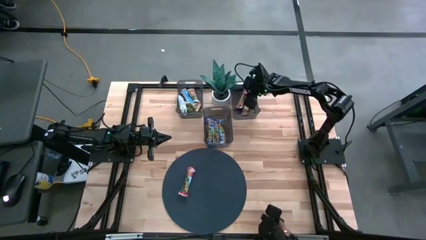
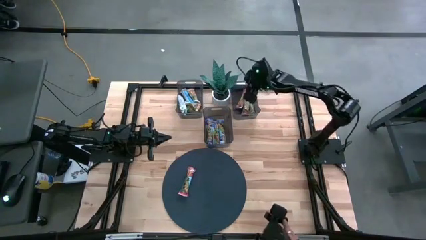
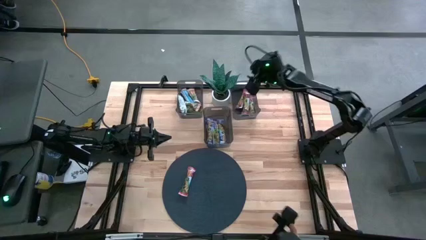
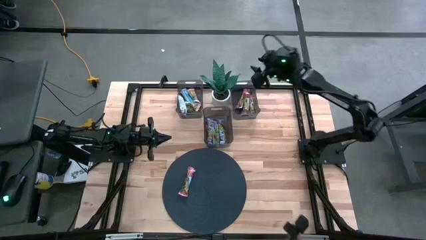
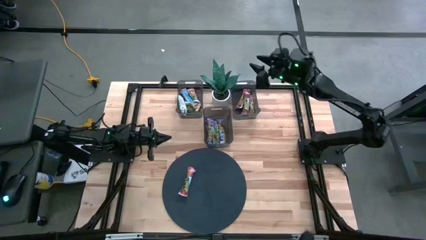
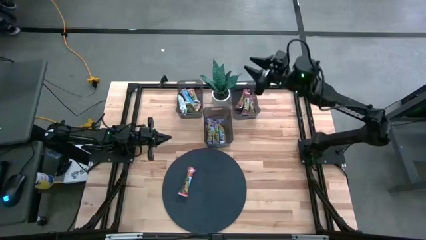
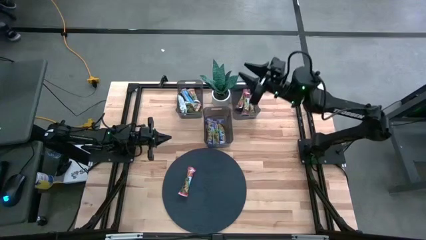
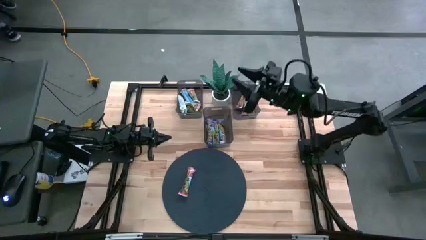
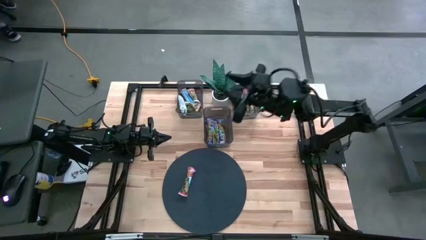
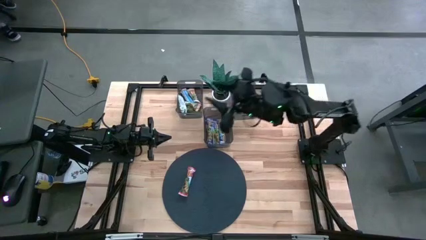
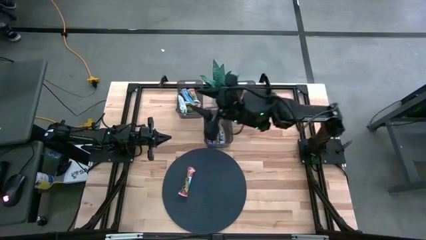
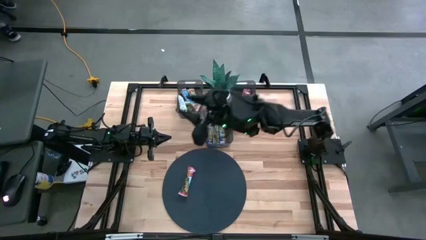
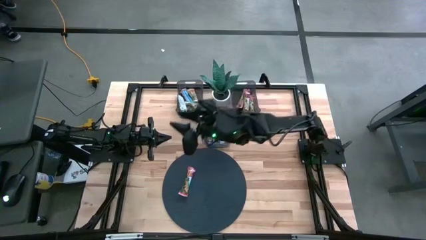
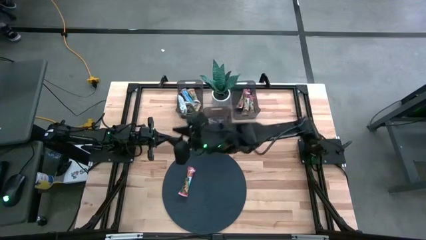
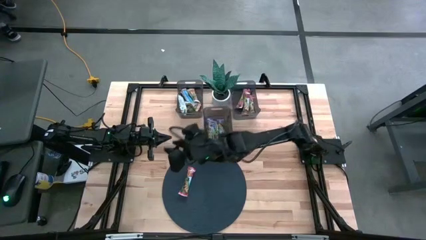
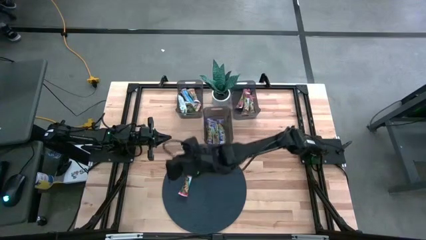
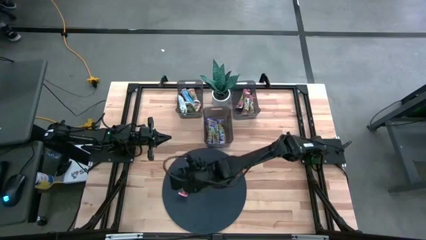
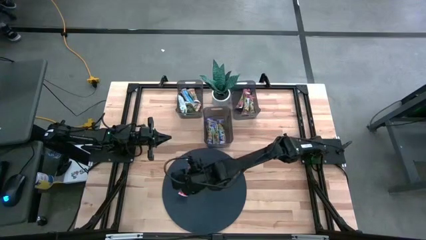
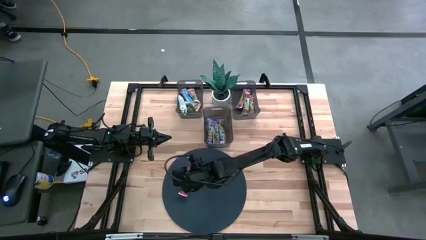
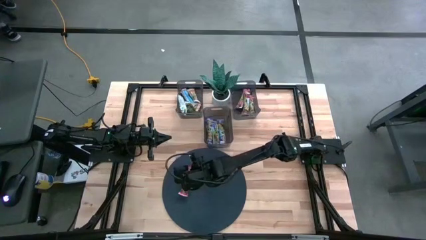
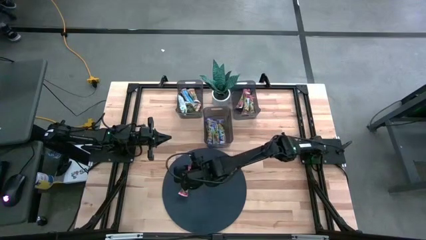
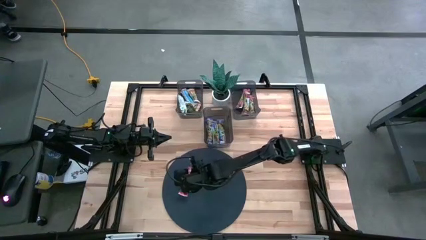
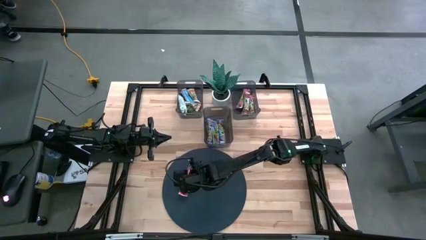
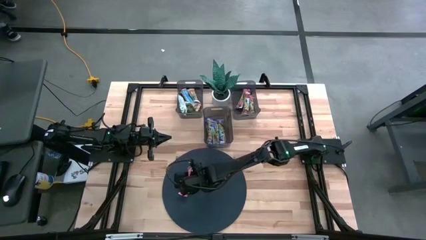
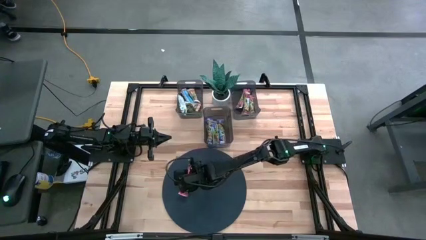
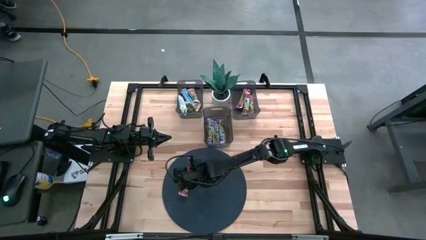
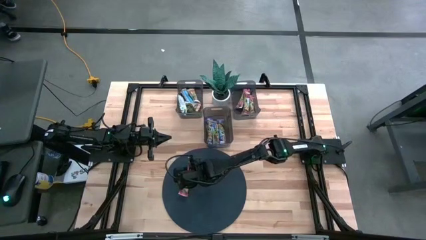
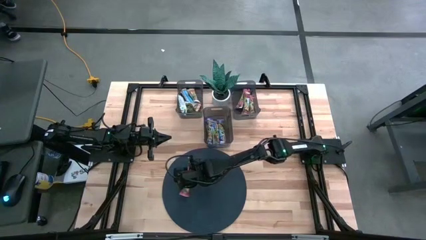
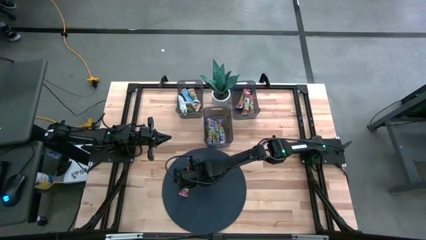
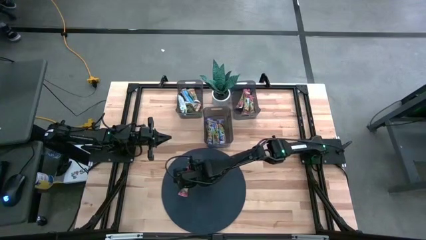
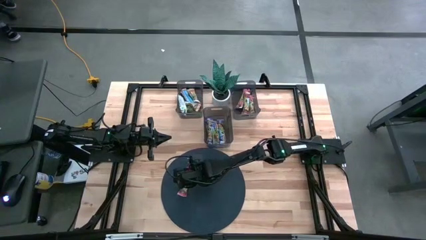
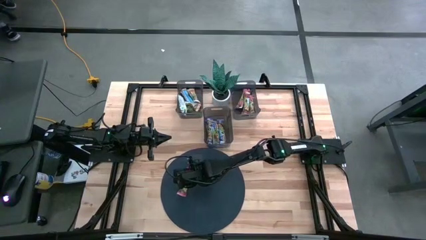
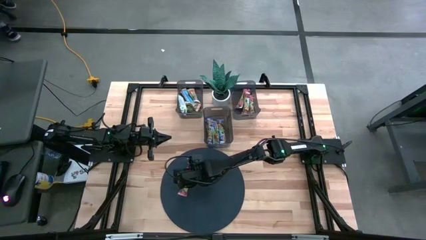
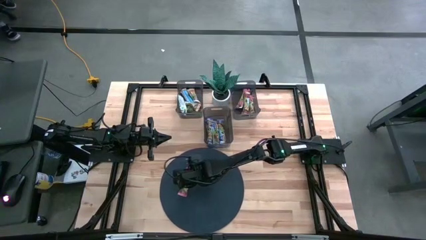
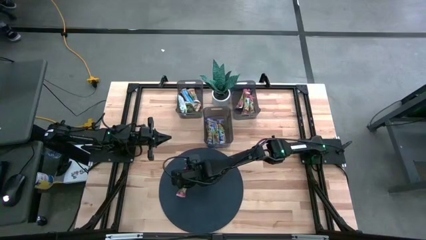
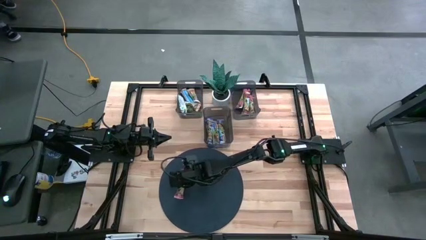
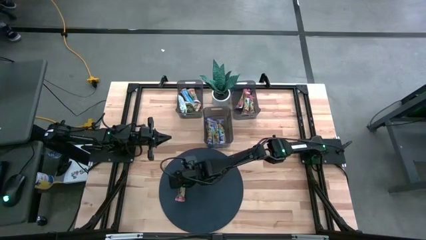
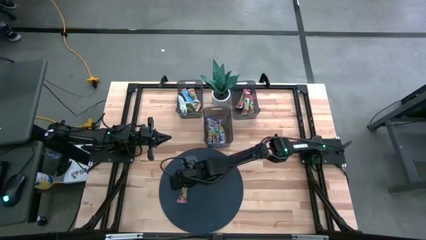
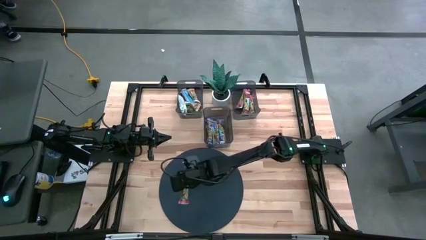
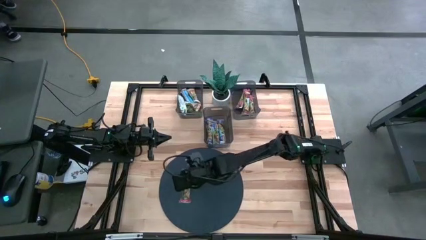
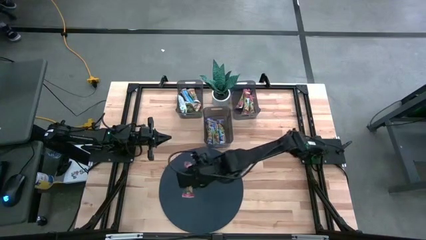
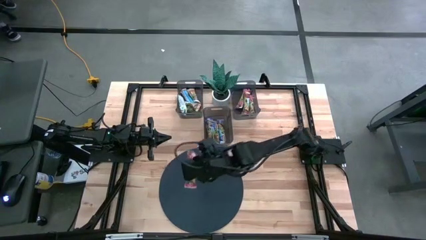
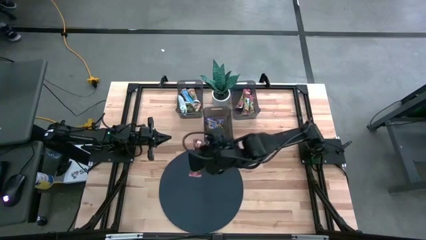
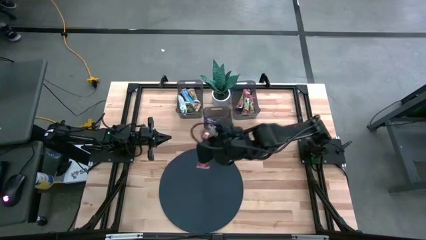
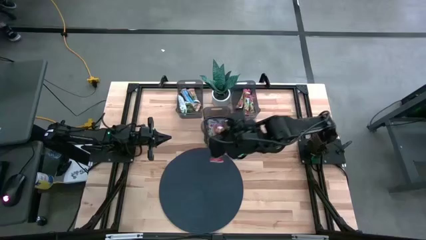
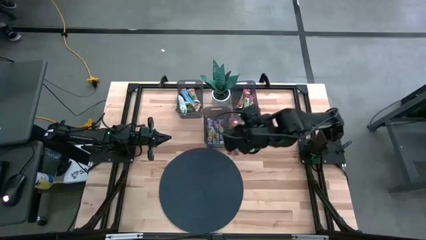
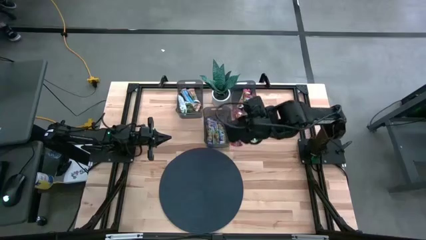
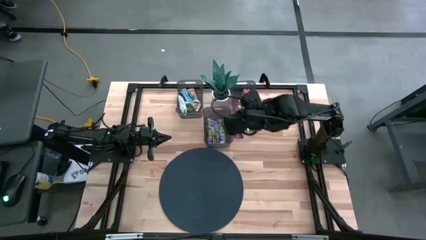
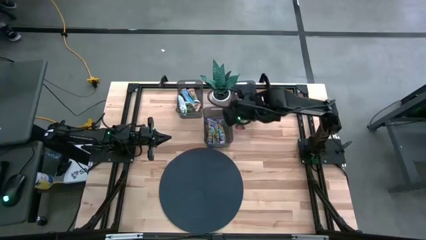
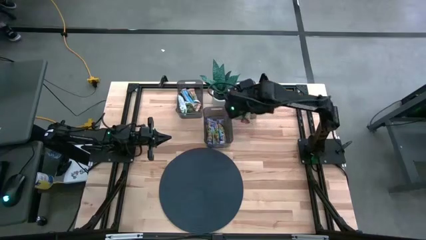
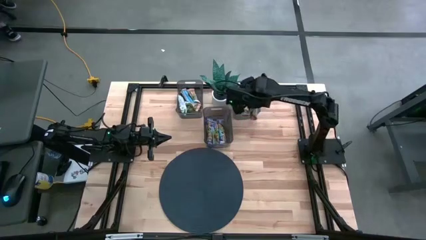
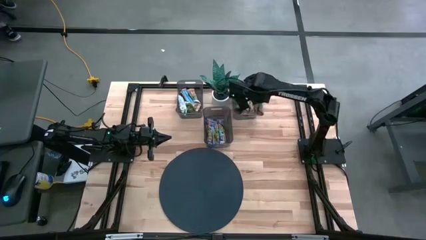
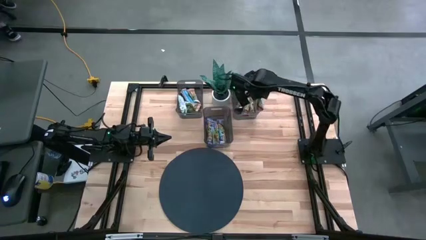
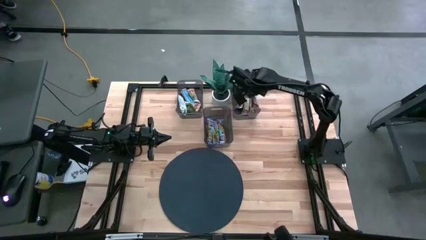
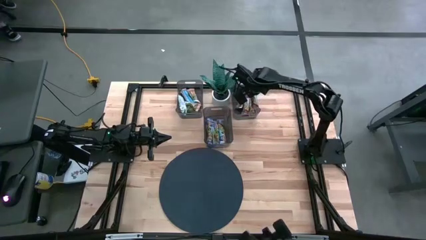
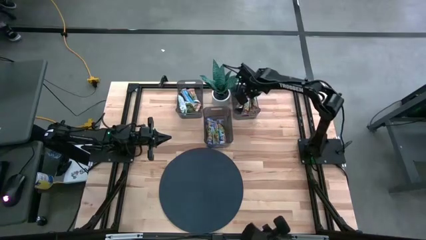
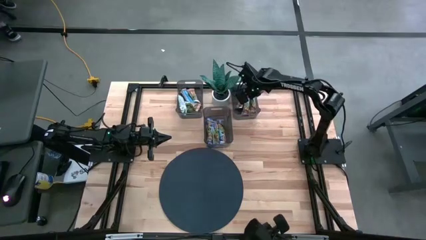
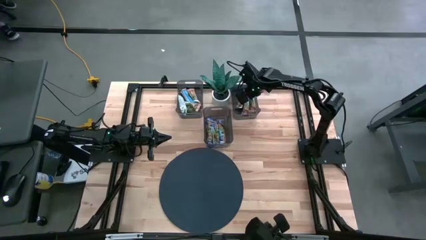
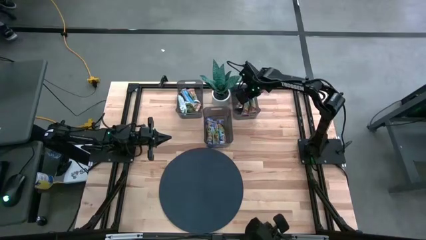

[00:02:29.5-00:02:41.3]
Task: Pick and place Granola Bars by type
Put the red granola bar into the right black bin

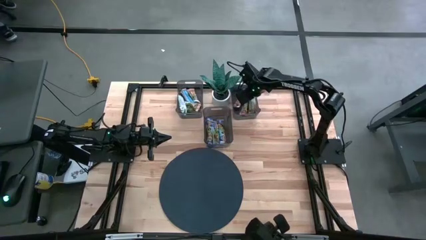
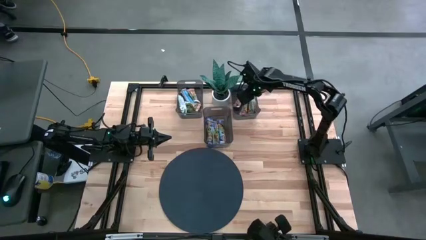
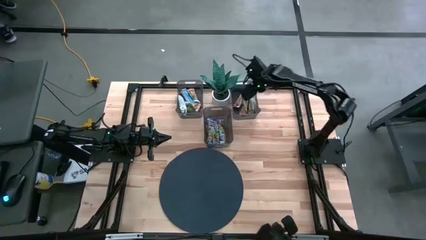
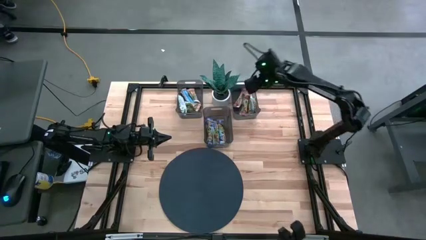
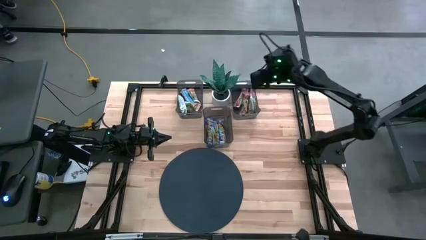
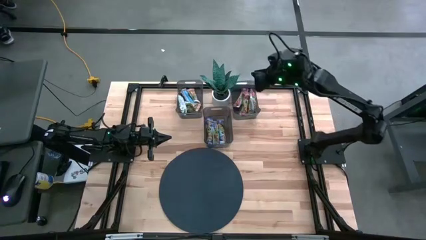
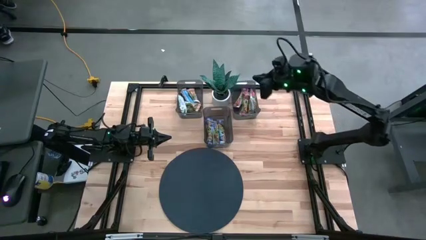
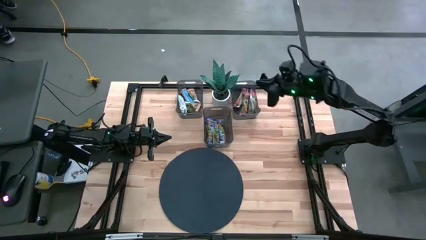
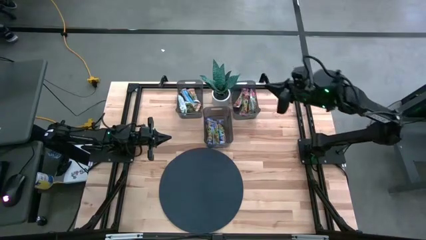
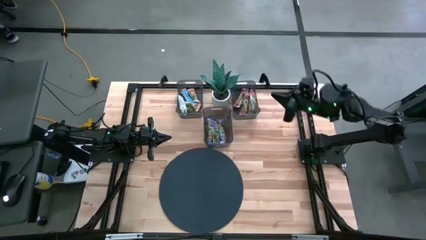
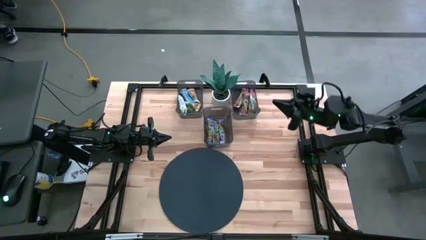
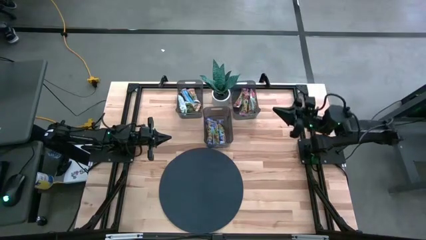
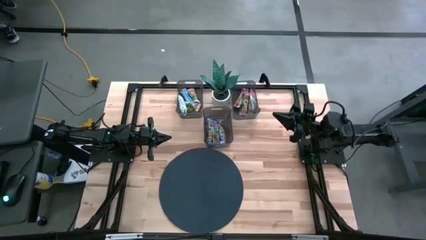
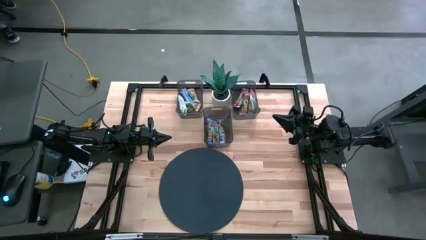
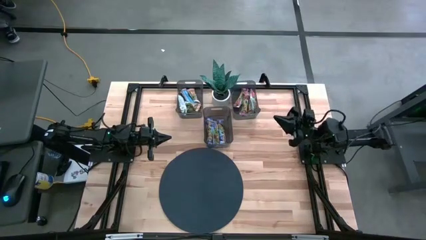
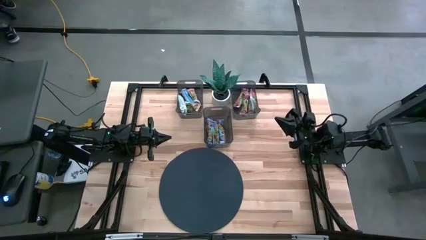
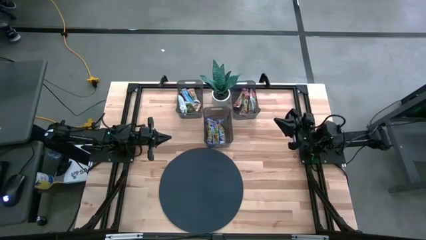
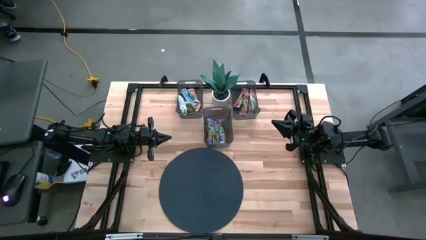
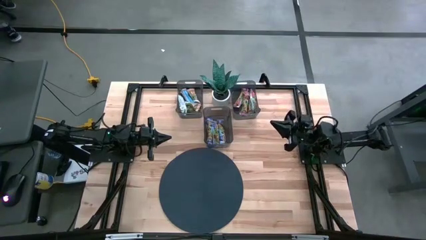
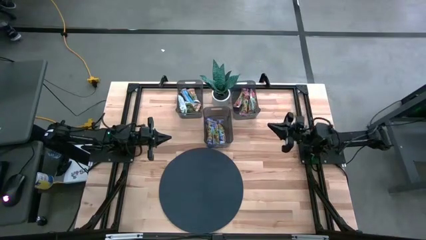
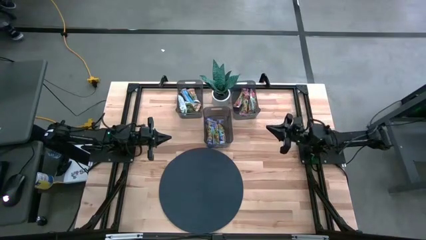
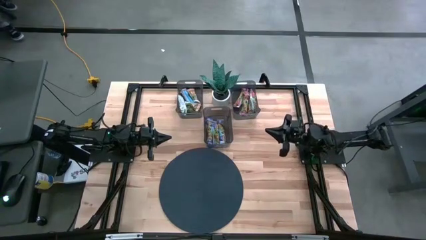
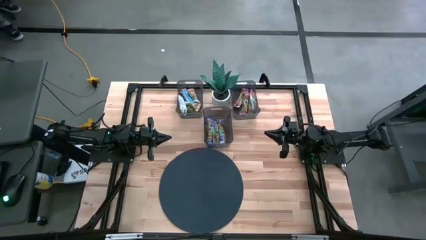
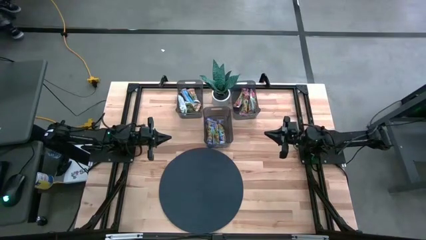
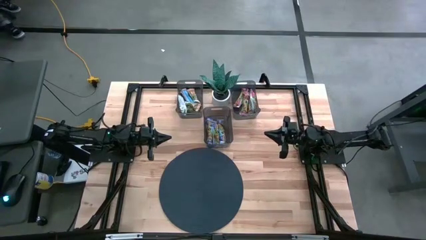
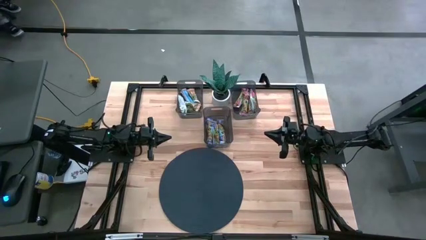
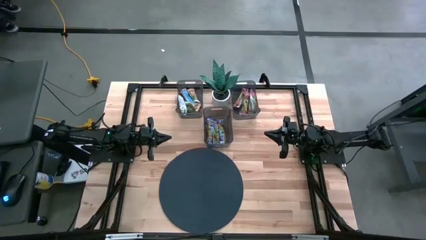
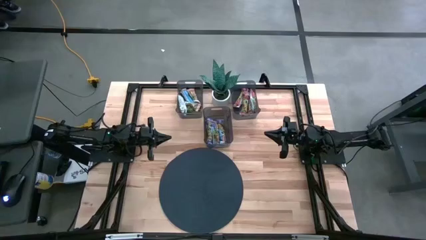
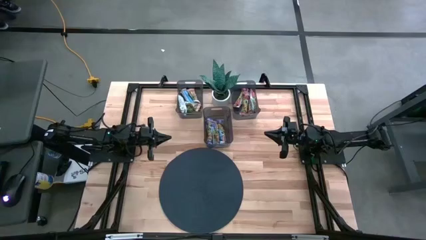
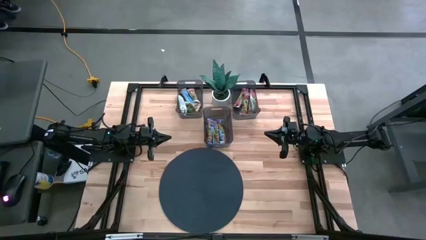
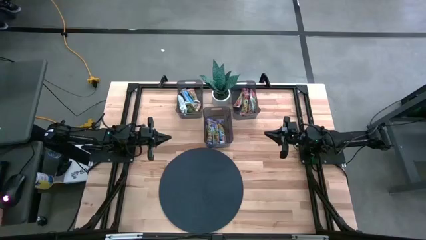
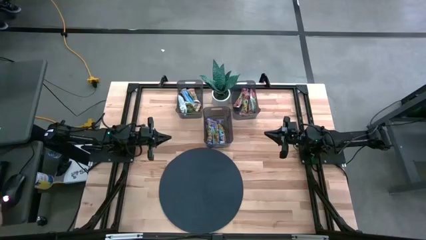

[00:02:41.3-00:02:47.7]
Return to Home Position
